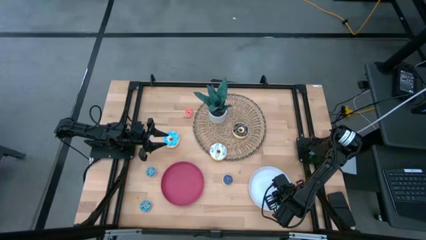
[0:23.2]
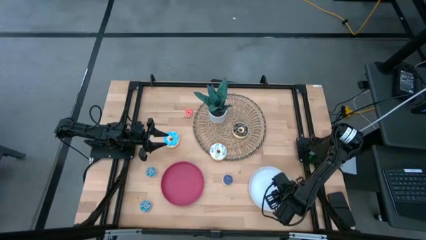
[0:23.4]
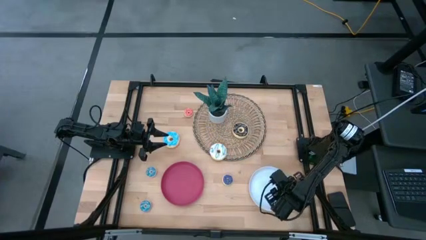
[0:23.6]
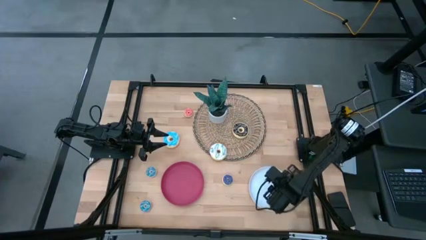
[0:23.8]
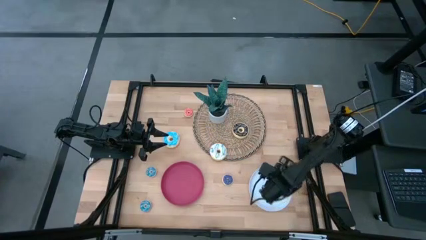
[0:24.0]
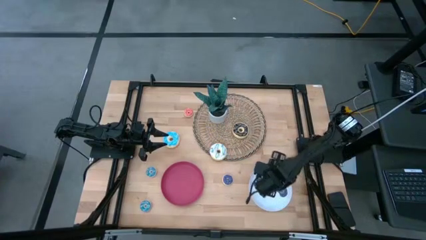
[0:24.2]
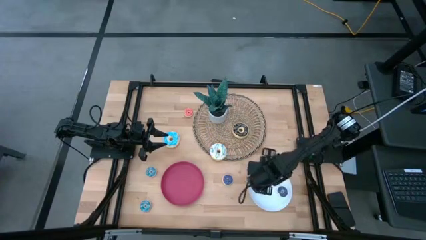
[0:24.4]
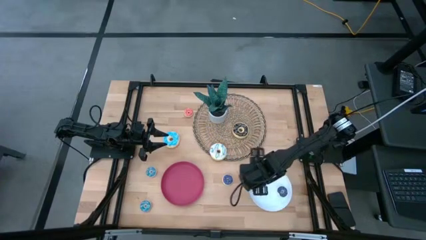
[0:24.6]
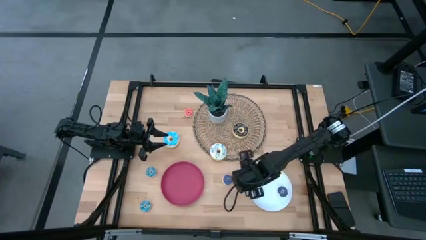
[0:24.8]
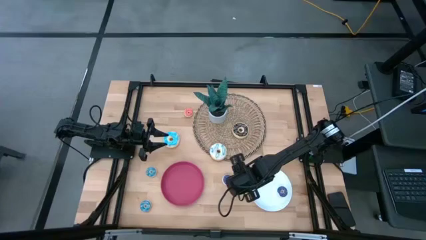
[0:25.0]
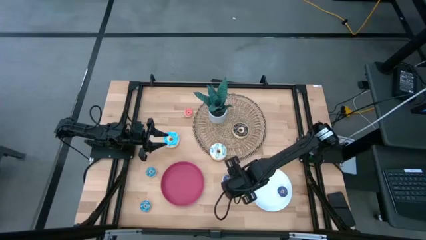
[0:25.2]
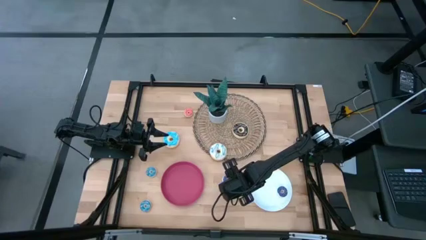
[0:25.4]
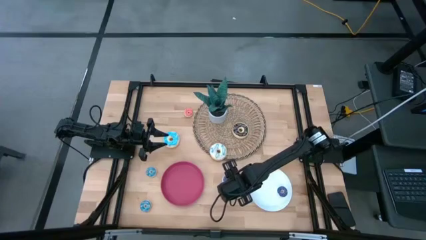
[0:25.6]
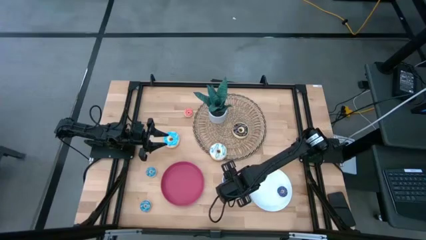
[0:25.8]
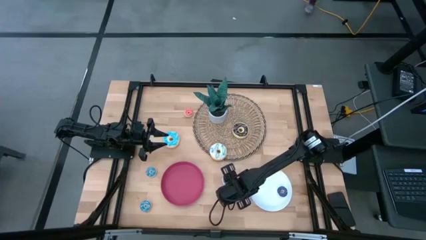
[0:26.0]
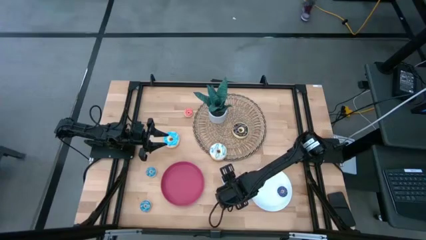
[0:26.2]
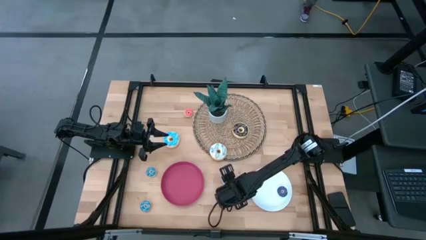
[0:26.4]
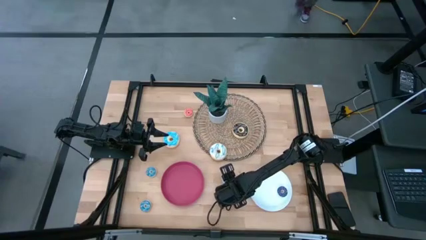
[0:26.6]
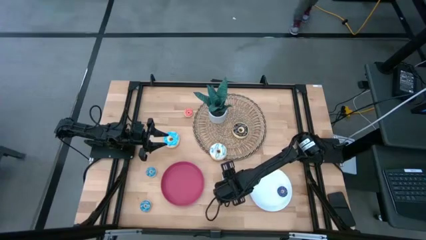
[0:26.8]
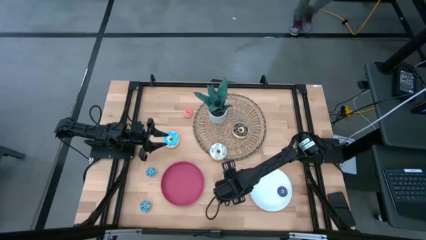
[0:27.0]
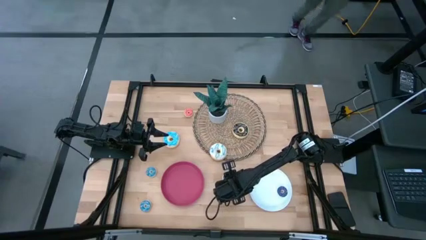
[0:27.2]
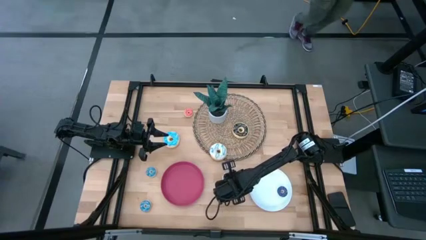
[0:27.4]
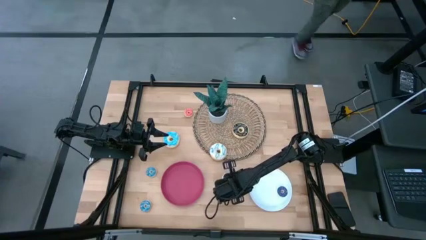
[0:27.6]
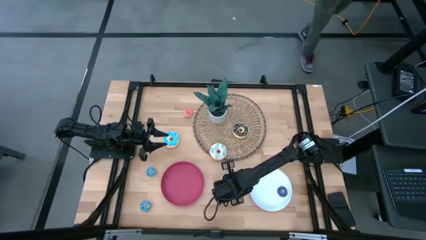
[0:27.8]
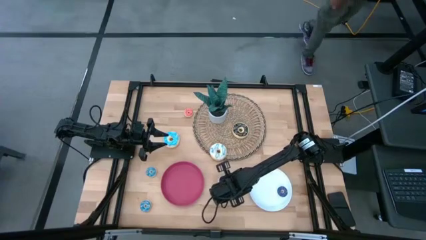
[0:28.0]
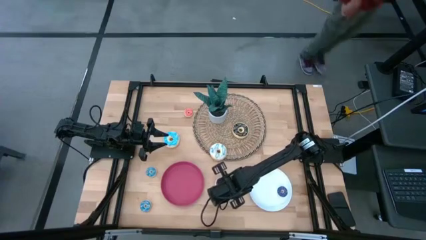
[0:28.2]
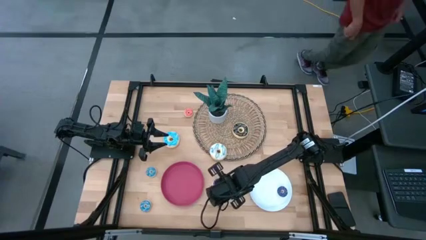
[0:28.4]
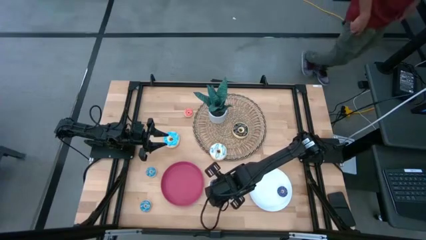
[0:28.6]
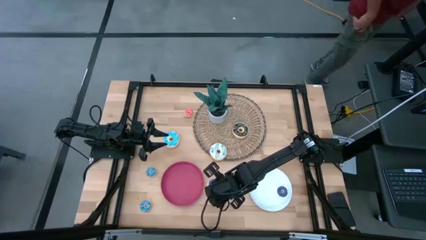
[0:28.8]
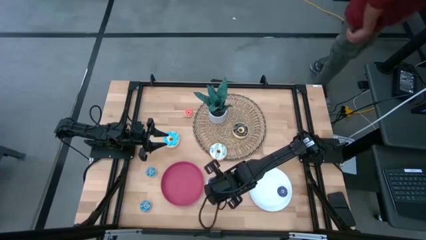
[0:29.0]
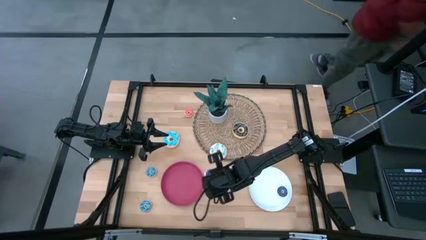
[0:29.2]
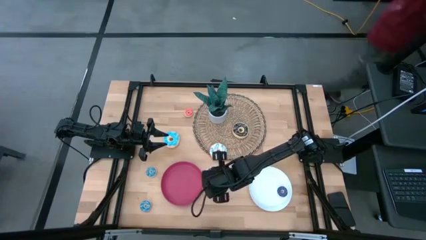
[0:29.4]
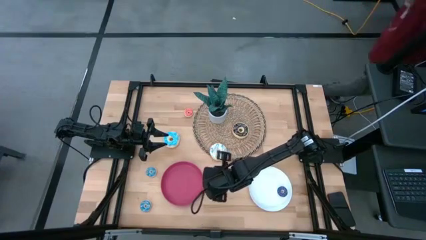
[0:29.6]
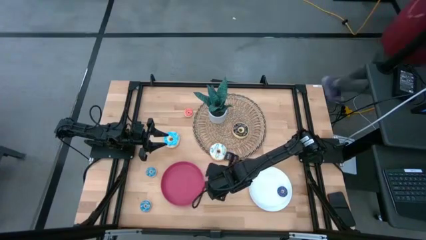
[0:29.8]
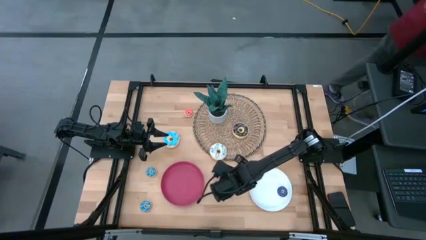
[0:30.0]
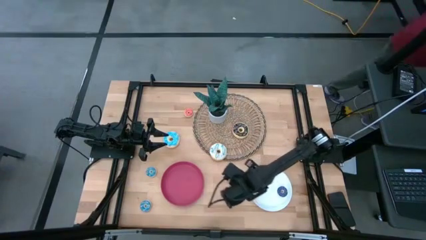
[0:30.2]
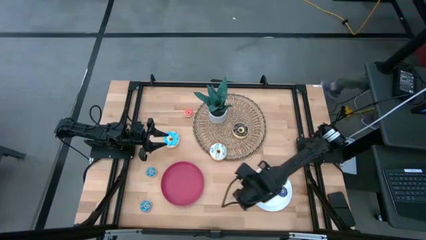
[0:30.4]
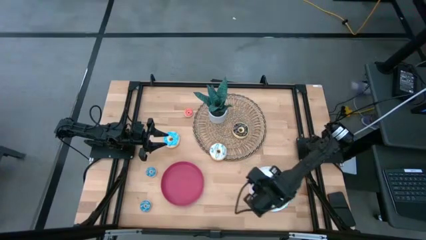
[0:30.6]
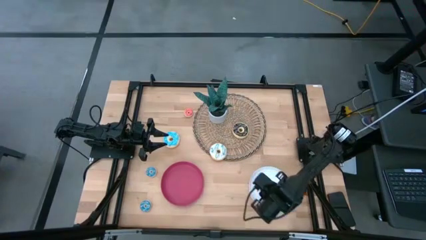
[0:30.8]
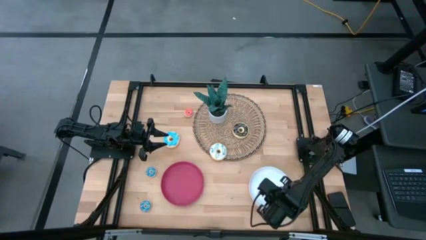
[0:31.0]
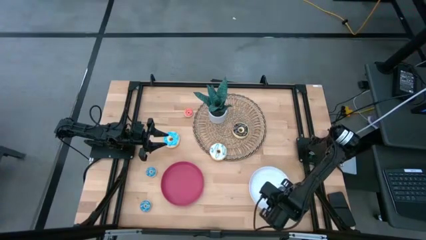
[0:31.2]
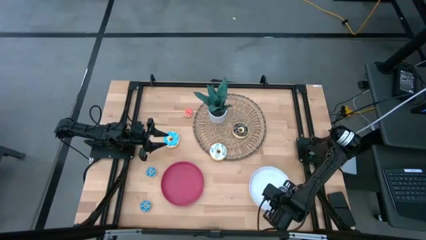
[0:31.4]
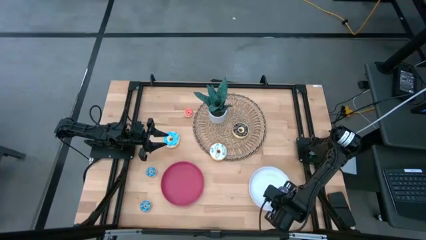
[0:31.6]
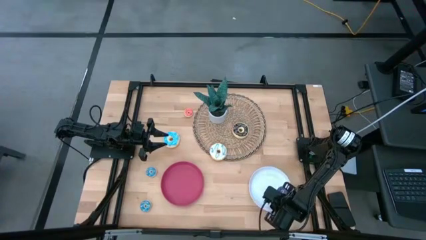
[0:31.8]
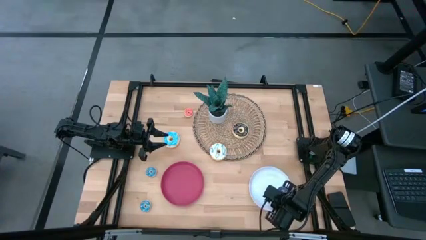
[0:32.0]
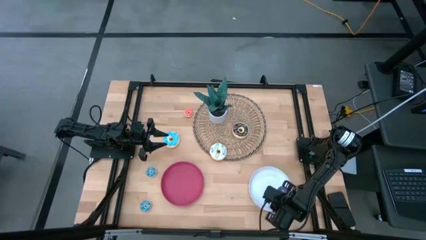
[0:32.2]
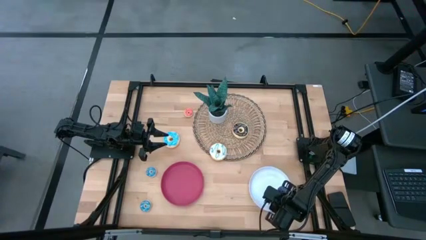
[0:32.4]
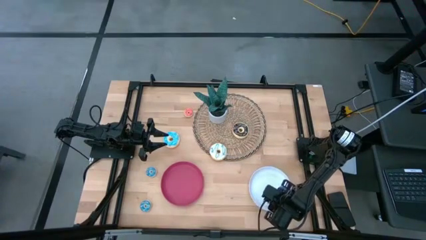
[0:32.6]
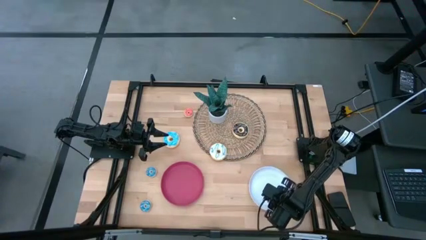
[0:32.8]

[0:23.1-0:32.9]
Task: Pick & Place donuts
Put the dark blue donut on the white plate
